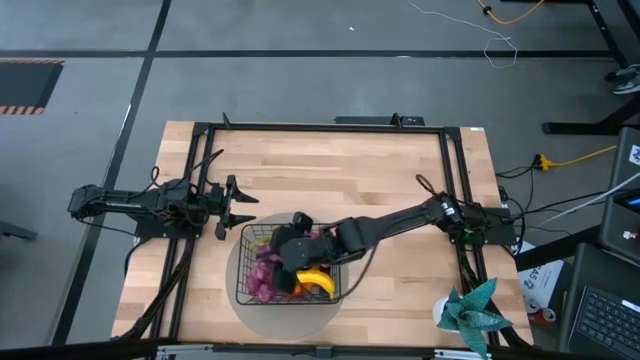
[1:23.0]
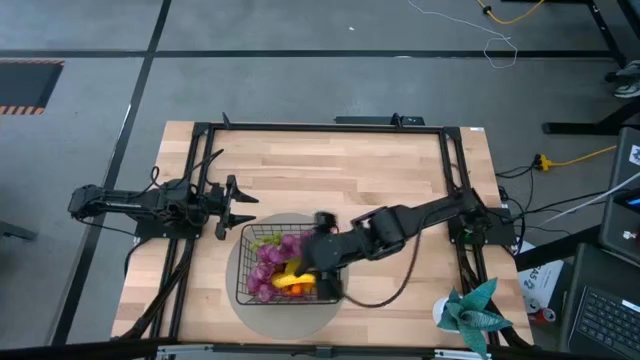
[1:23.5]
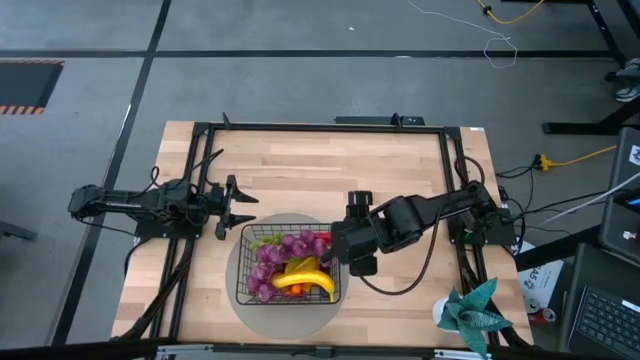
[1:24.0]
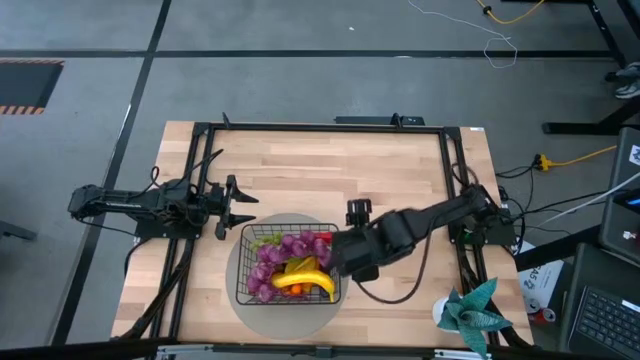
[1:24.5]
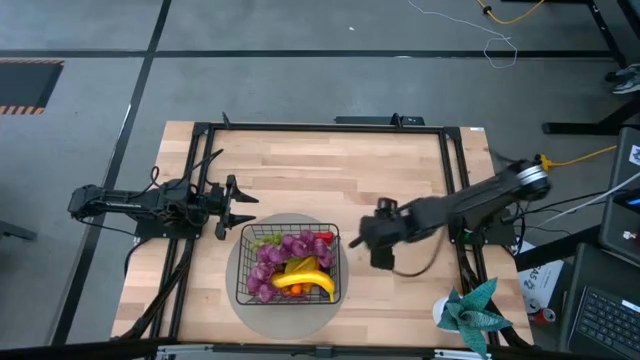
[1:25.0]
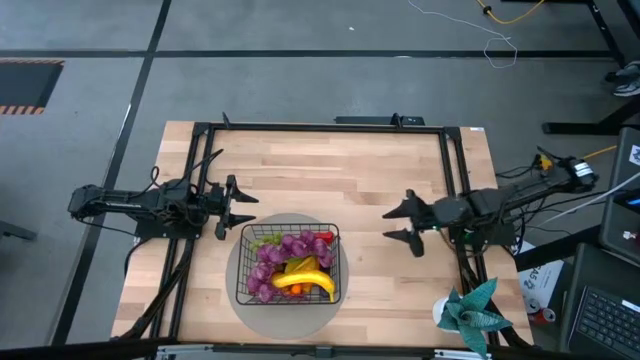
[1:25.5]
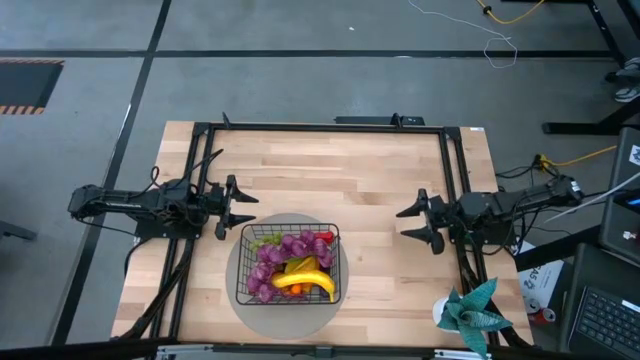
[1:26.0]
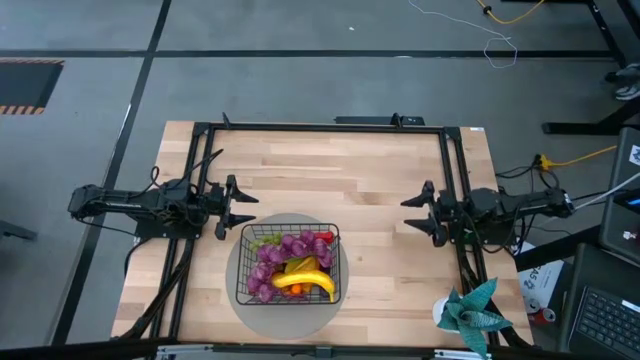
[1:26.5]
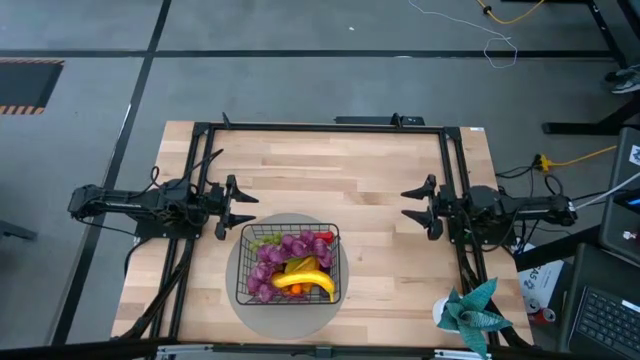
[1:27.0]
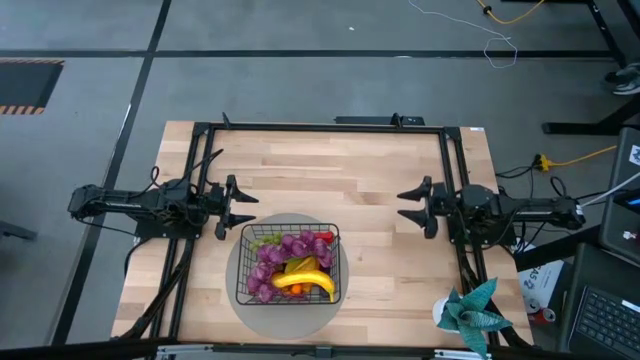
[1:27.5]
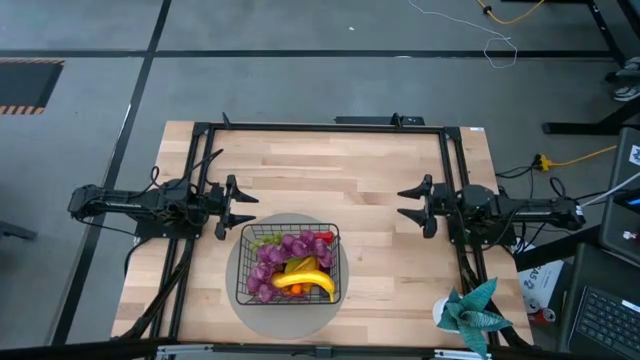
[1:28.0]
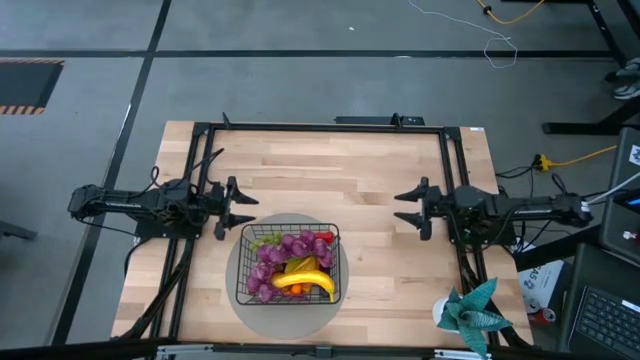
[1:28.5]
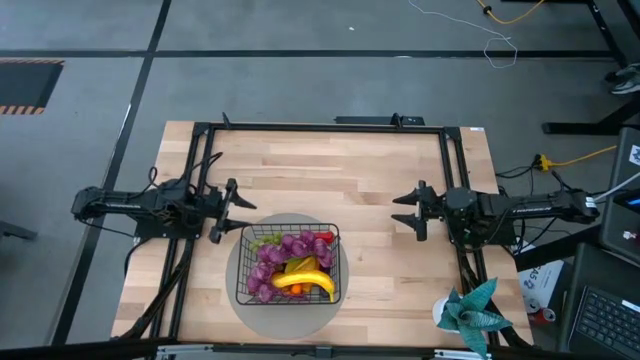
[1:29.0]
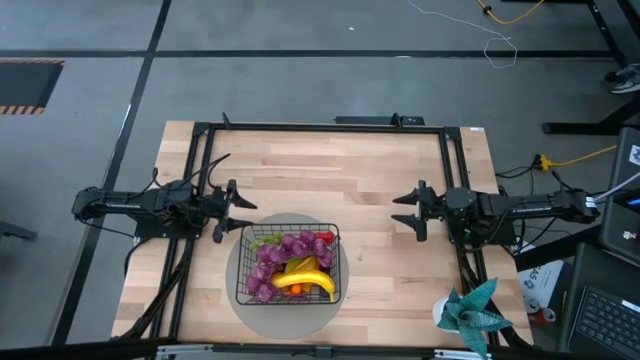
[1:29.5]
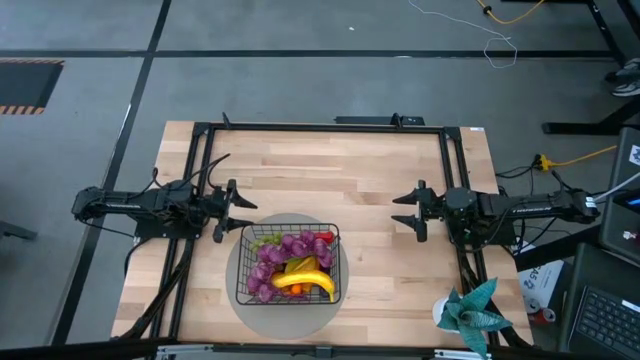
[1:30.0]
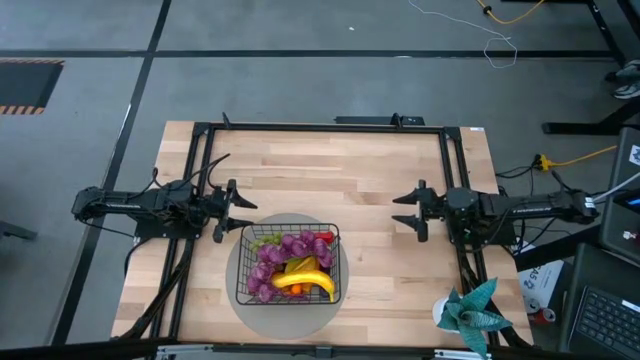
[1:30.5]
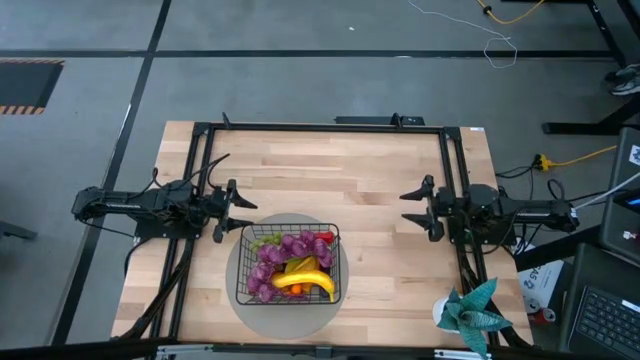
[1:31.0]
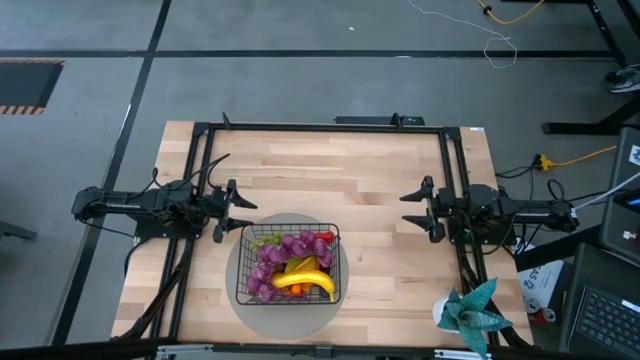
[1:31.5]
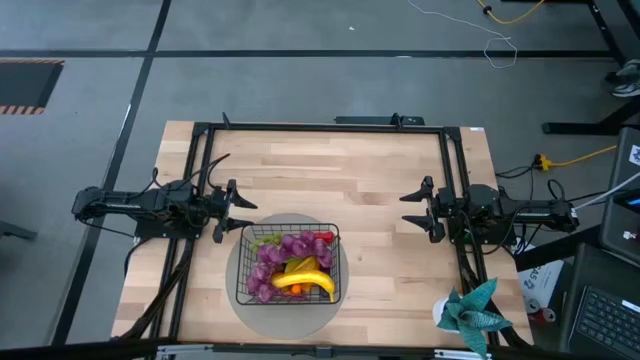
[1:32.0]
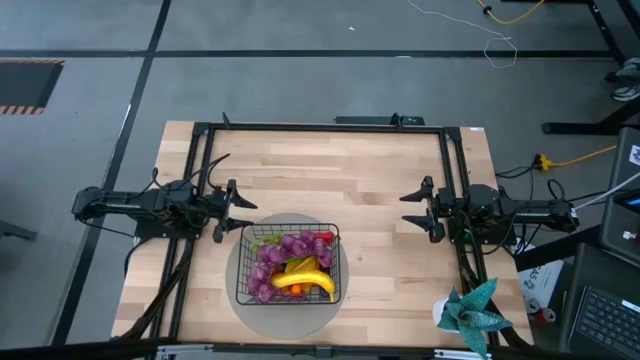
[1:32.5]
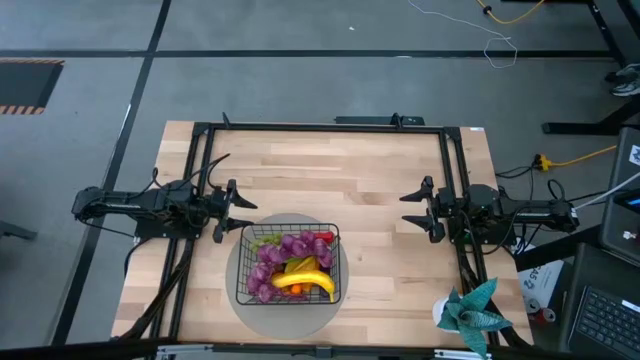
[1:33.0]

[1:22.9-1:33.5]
Task: Build produce basket
Return to Home Position

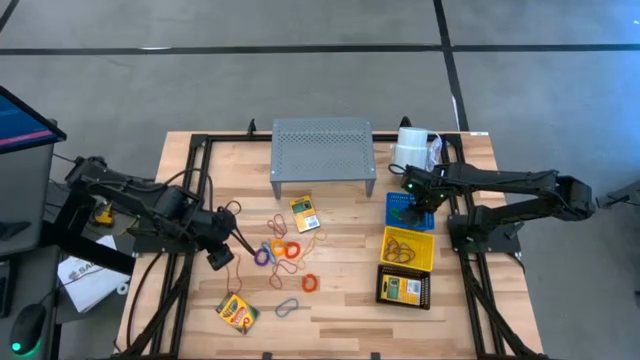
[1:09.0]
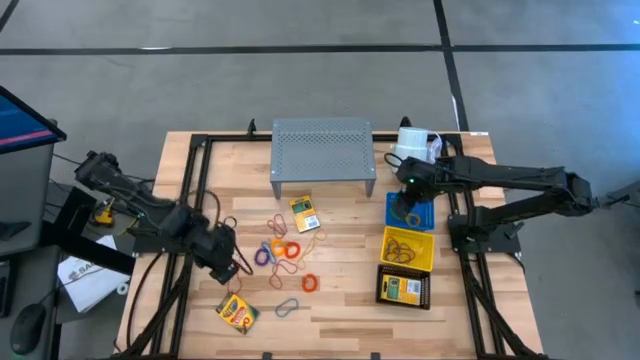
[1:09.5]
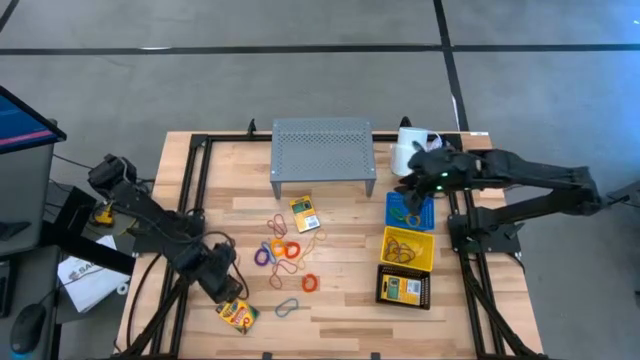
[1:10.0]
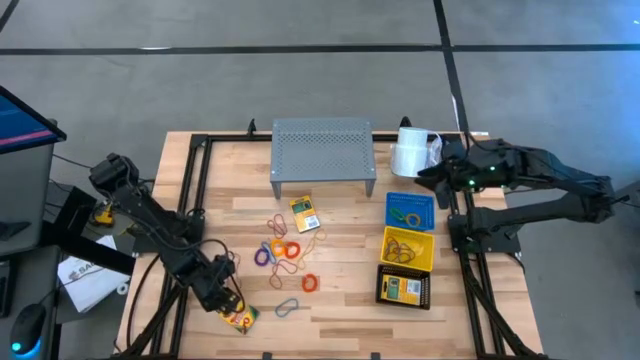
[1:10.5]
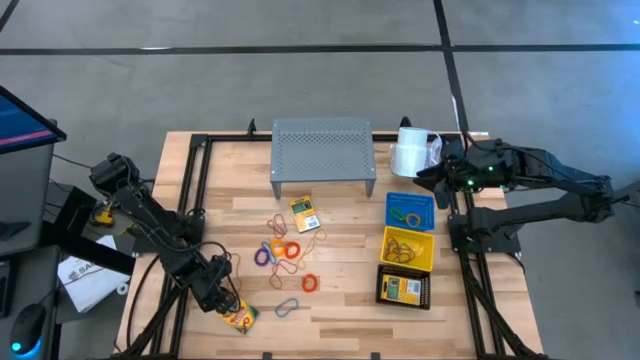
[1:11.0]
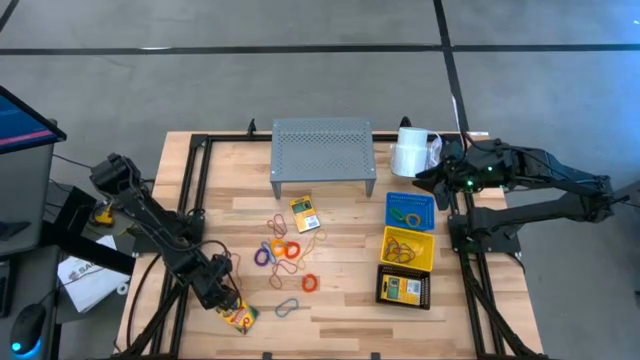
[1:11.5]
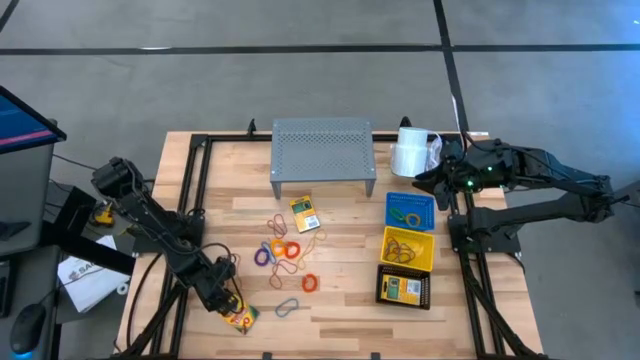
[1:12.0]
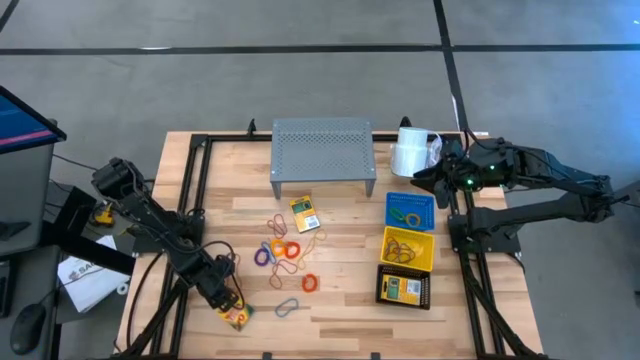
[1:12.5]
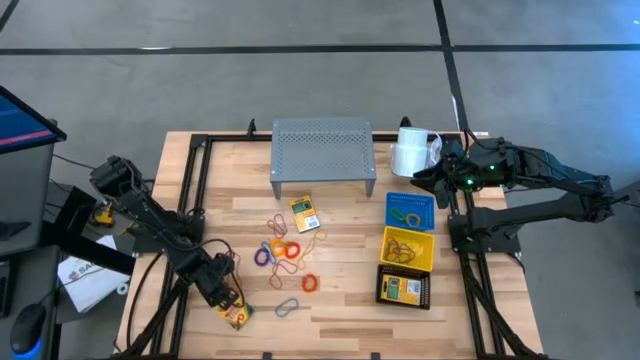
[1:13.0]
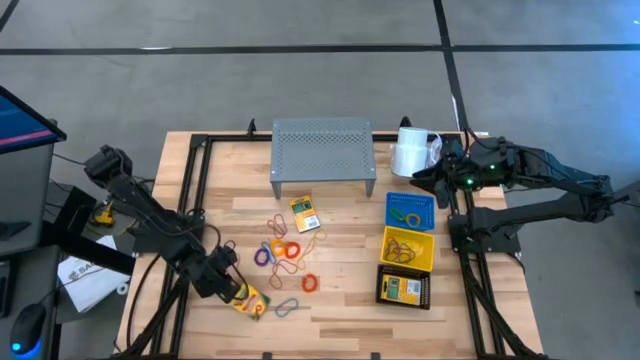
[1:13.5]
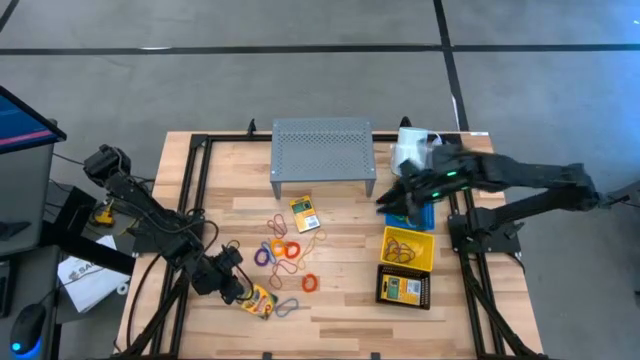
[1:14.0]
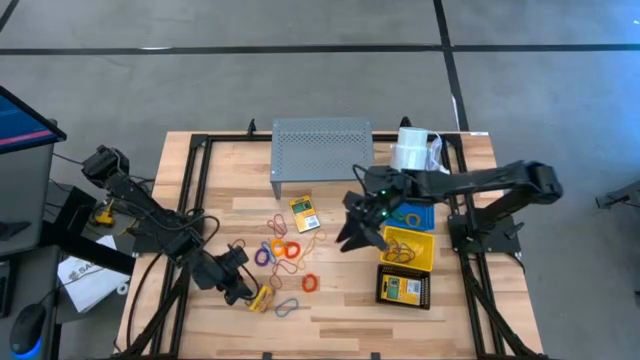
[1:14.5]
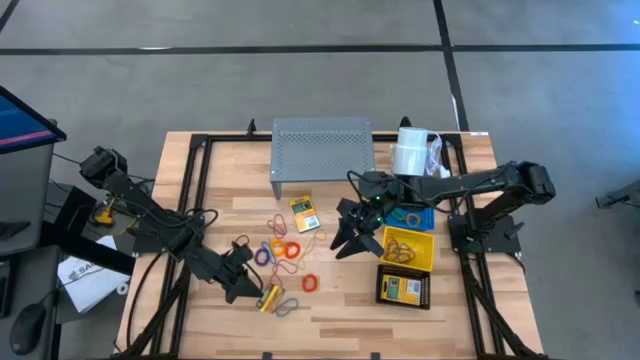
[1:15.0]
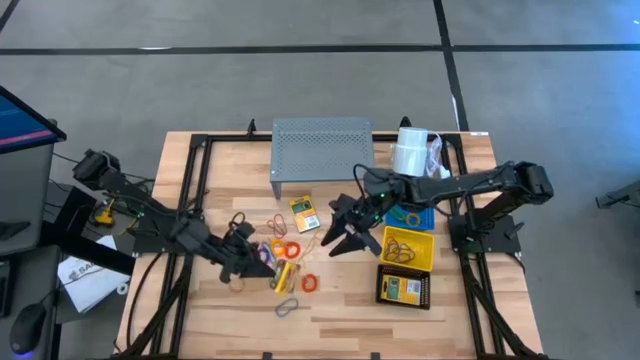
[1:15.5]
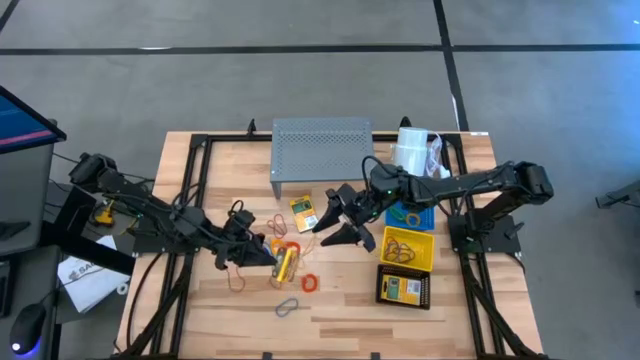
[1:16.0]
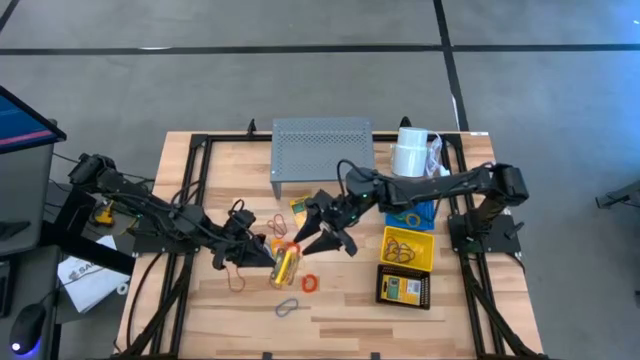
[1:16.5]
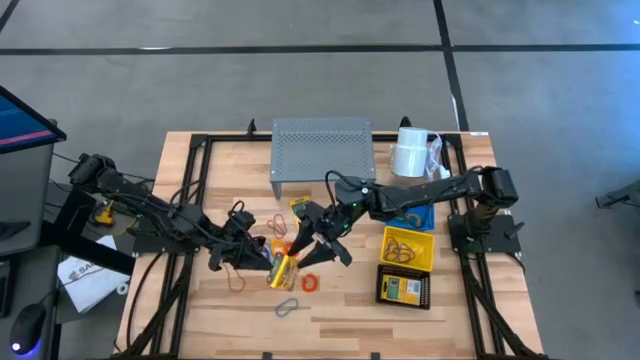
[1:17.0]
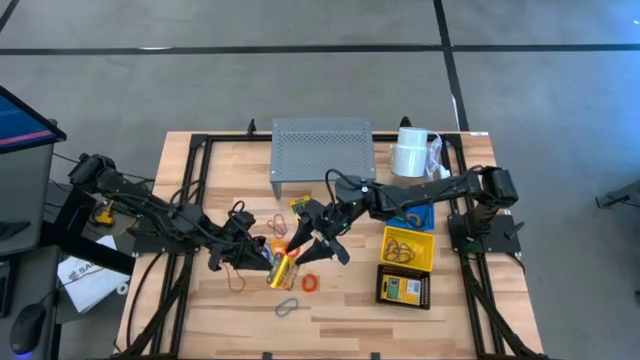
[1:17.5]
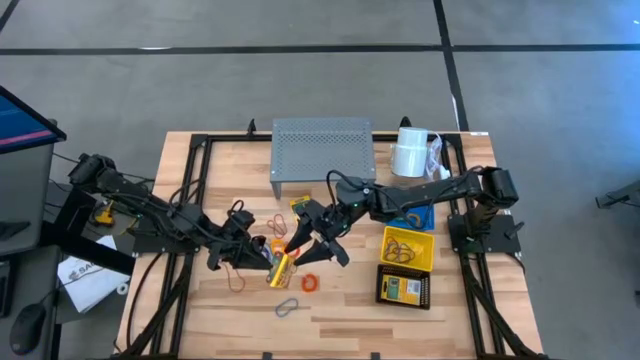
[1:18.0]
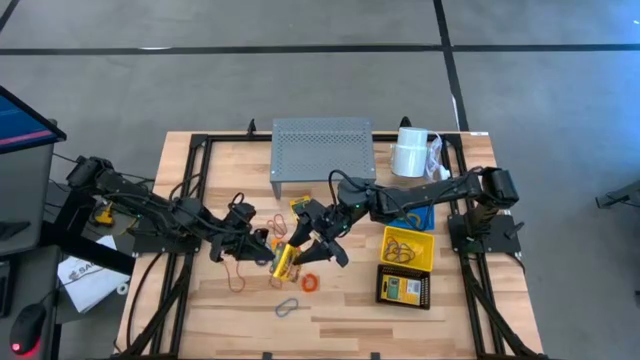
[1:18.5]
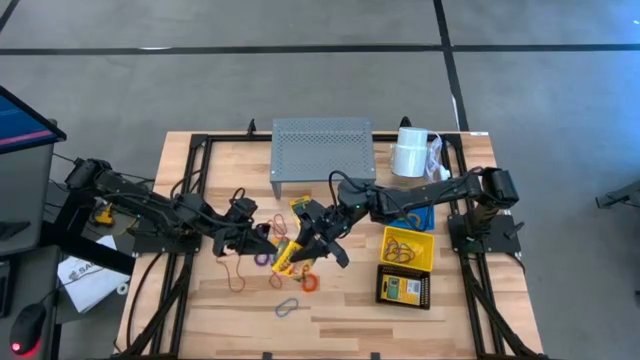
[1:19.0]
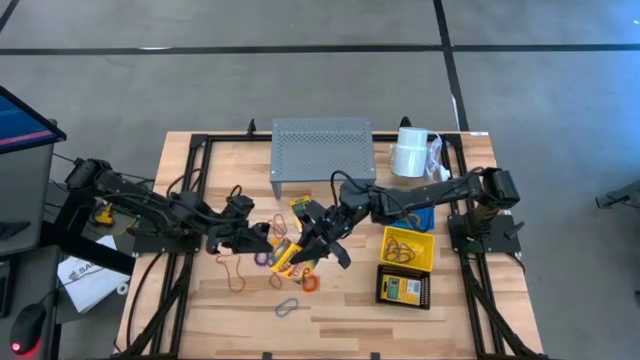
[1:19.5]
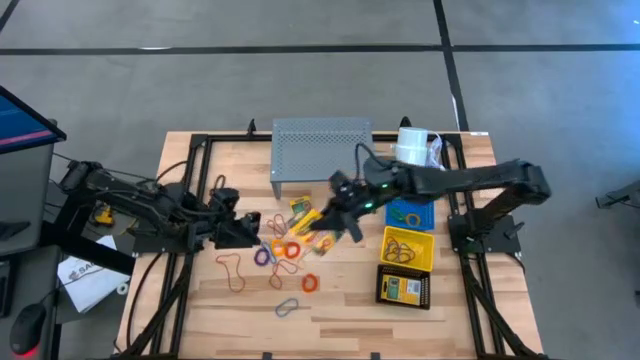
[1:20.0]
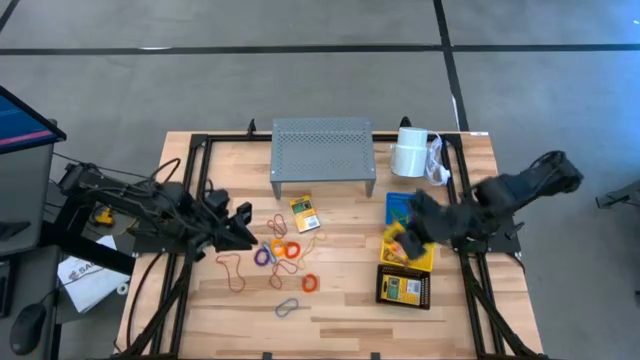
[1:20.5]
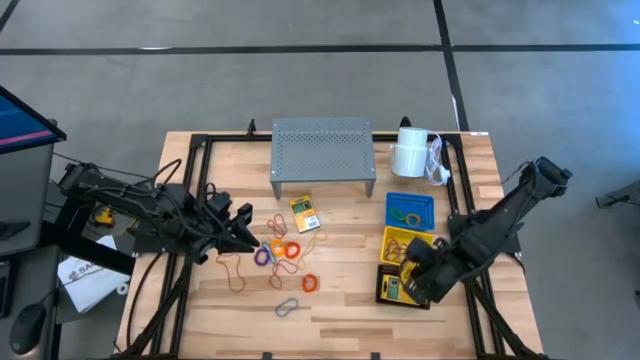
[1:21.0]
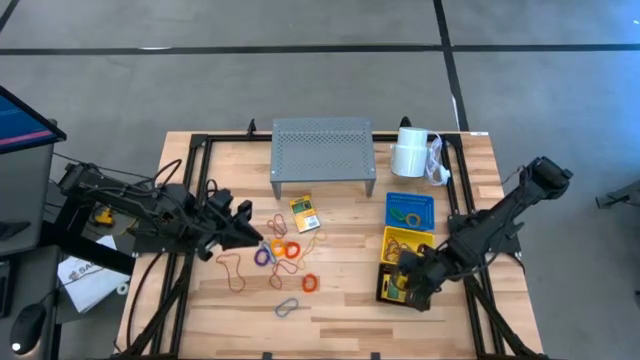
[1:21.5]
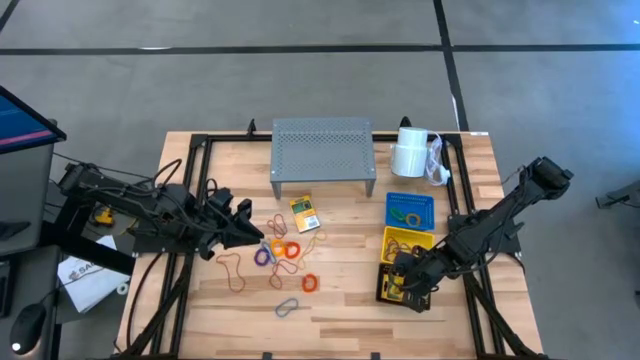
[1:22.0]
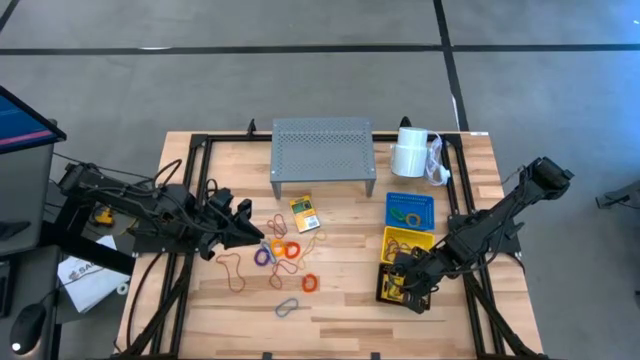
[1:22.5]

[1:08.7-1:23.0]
Task: Pick & Place Office Desk Supplies
Put the crayon box into the black basket
